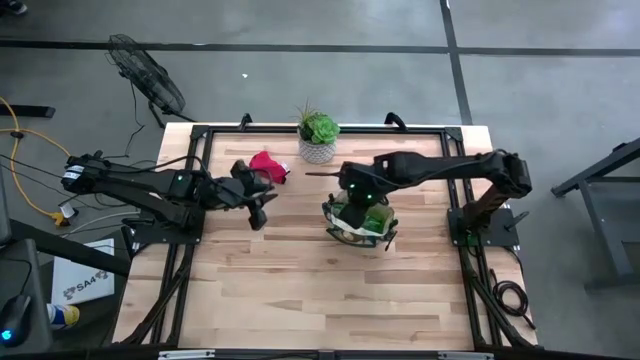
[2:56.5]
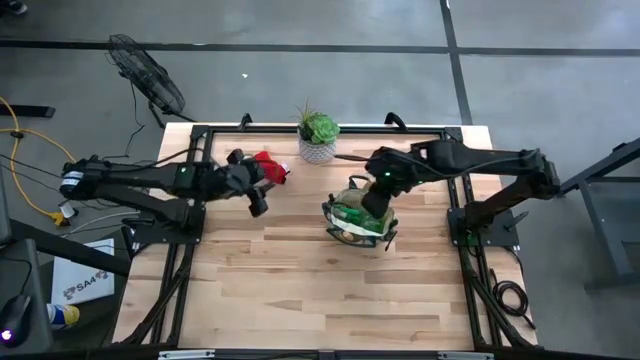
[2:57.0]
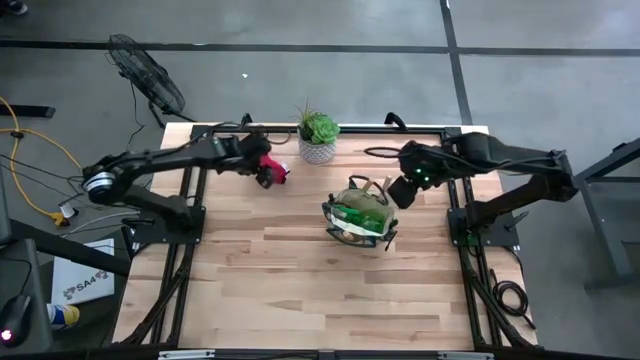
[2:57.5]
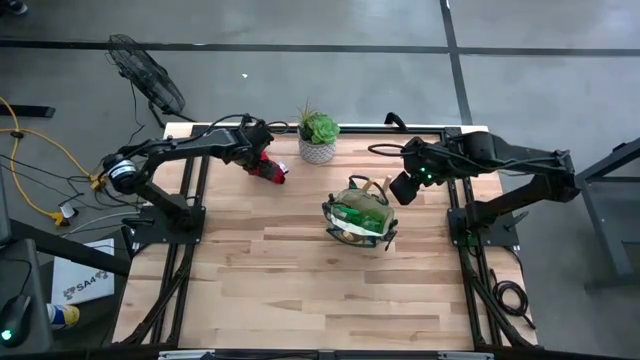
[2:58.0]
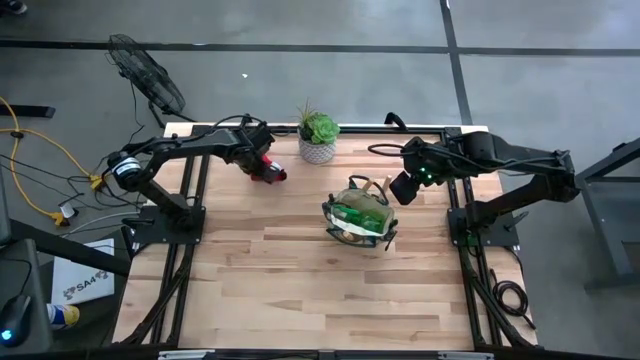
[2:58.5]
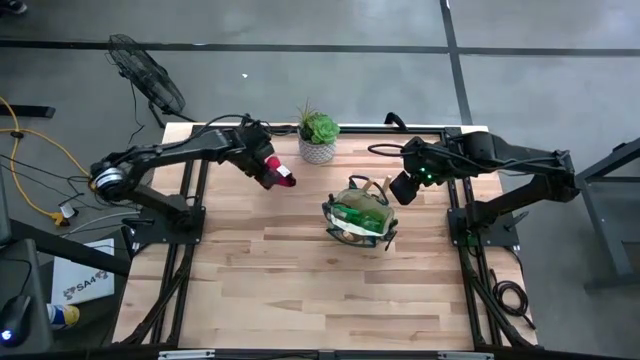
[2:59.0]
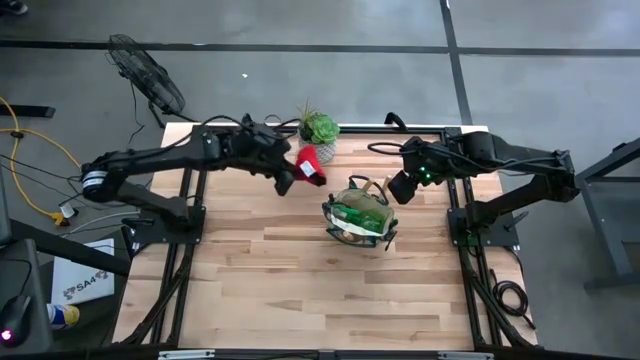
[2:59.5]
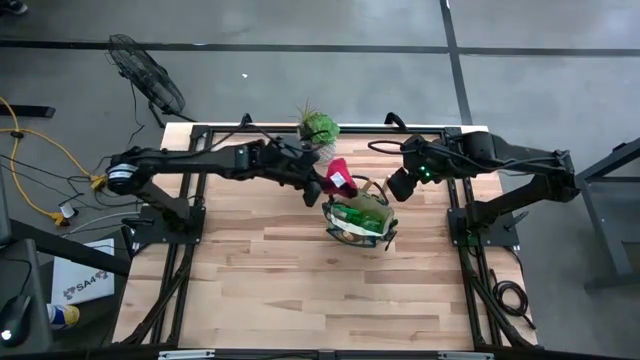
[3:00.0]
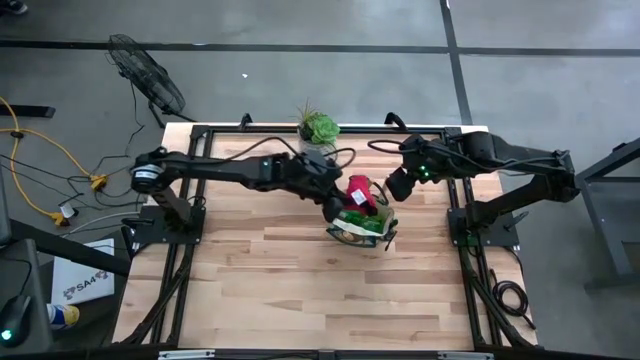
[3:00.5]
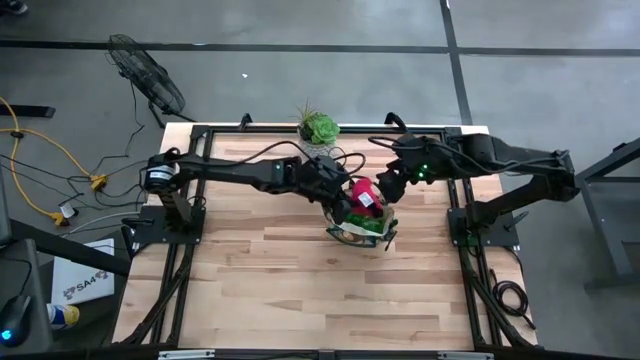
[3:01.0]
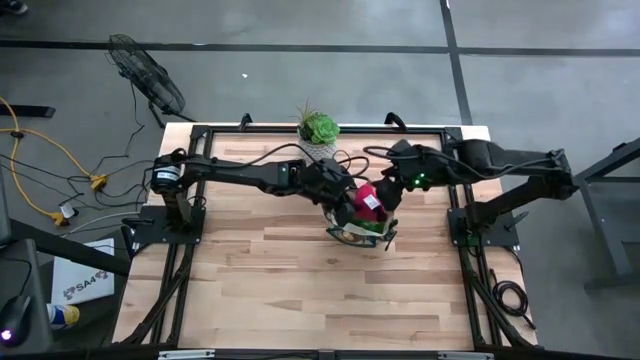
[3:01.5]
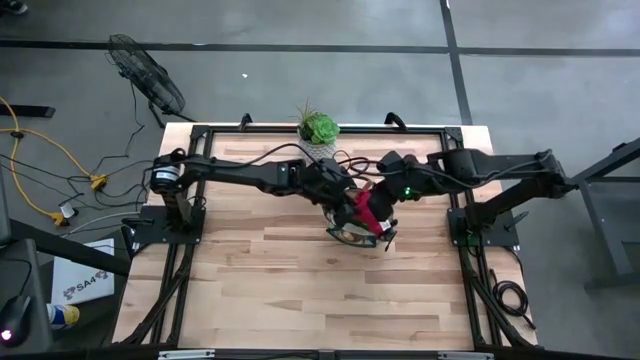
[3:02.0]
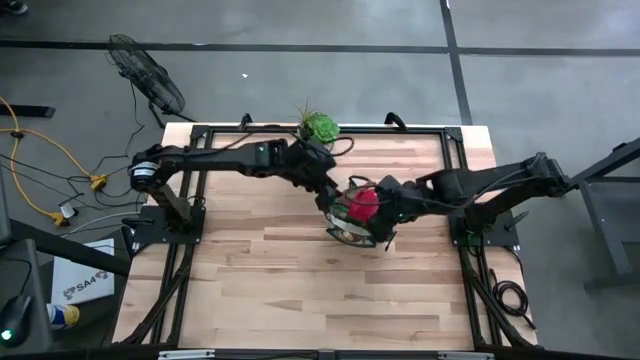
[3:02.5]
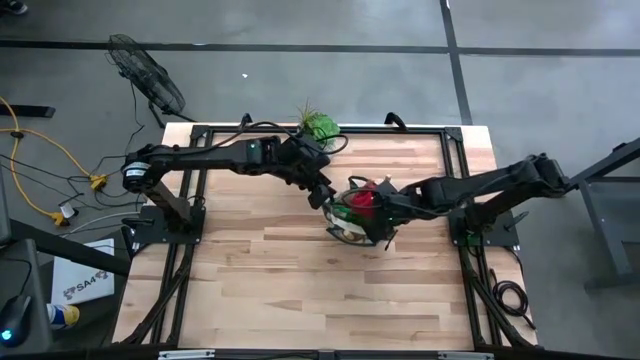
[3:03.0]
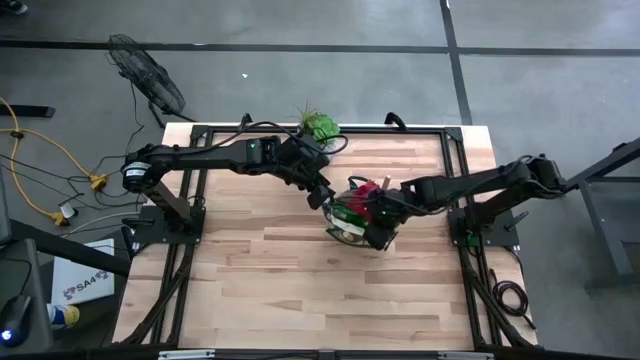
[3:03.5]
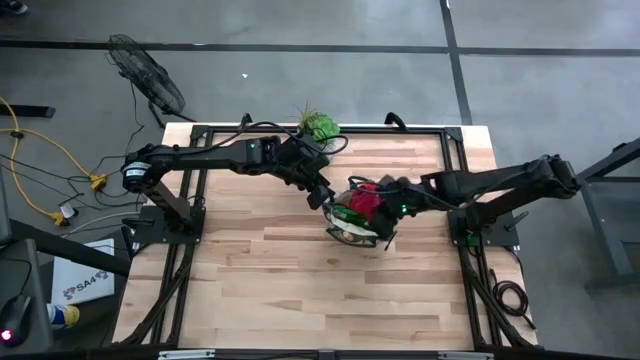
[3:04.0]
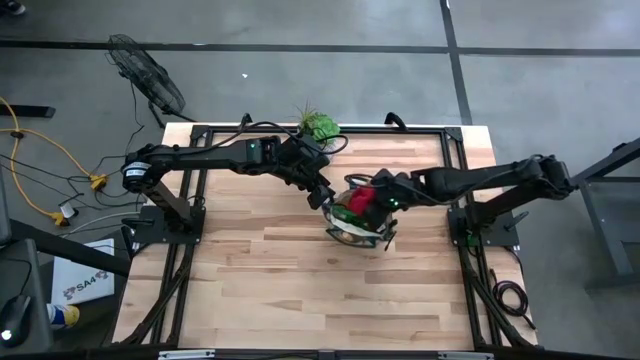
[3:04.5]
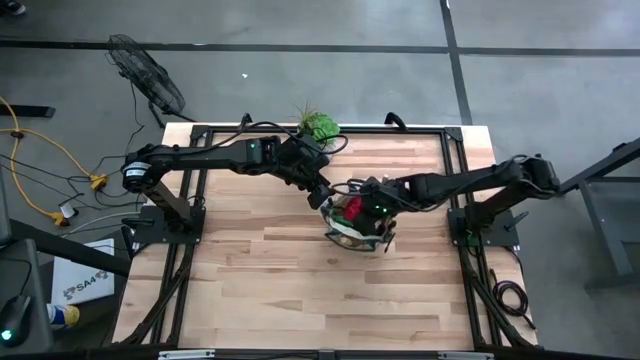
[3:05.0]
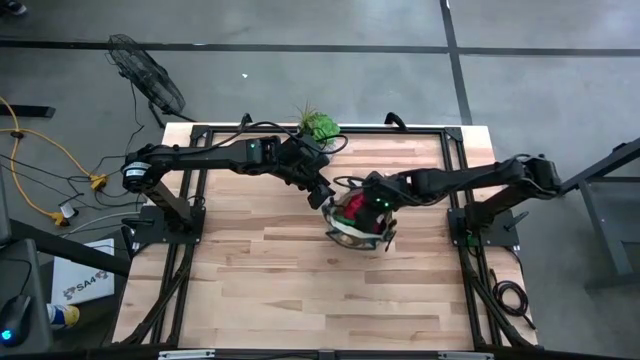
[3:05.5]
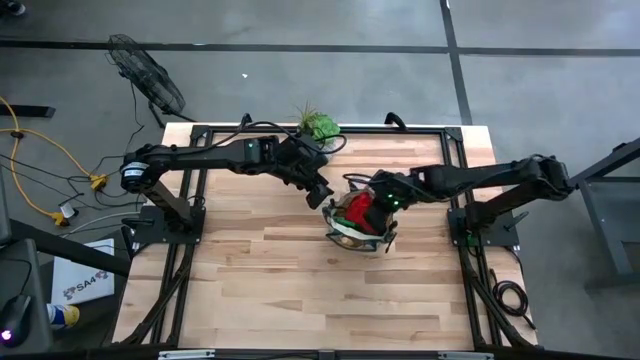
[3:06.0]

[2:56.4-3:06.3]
Task: Pick & Place Garden tools in Gardening bag
Put the red glove into the gardening bag

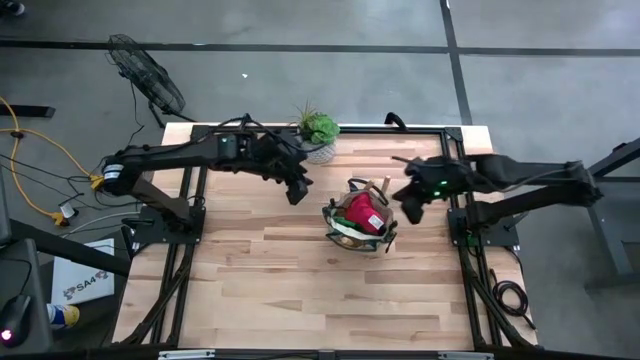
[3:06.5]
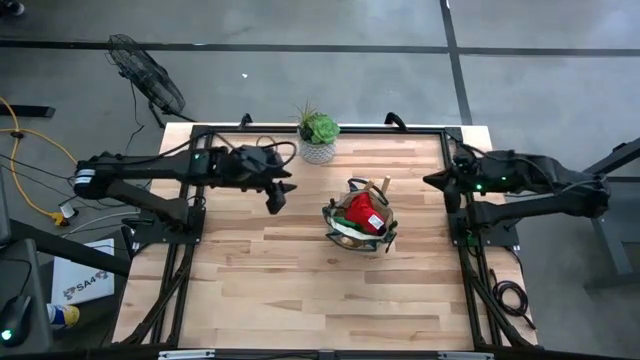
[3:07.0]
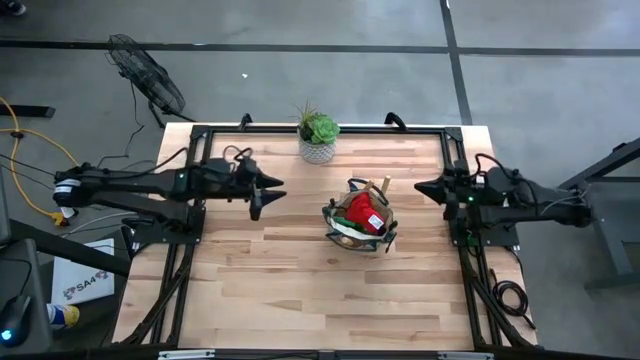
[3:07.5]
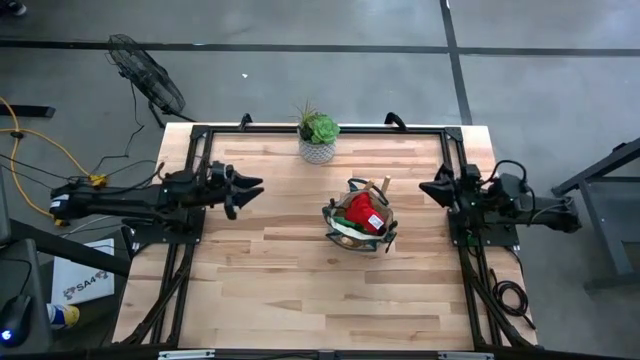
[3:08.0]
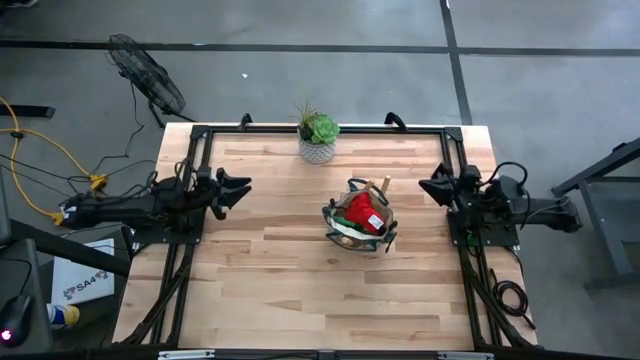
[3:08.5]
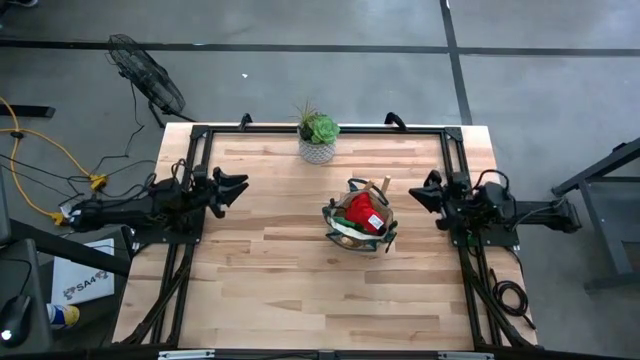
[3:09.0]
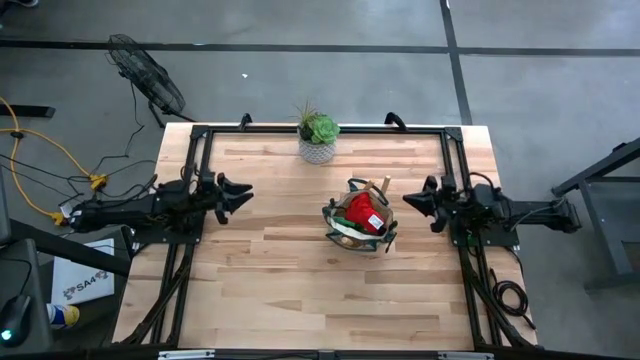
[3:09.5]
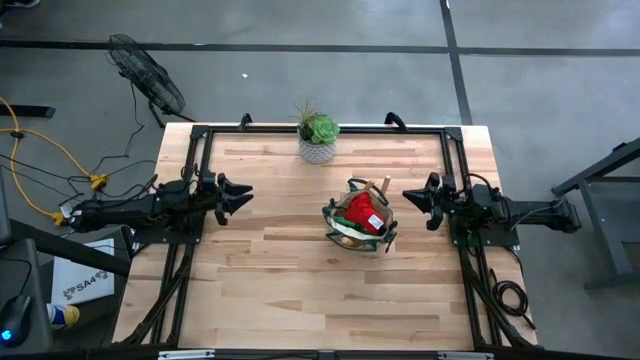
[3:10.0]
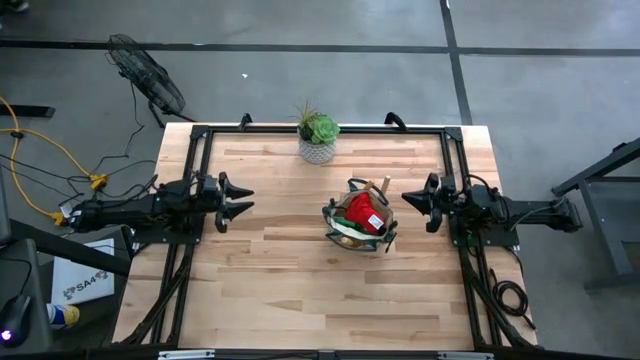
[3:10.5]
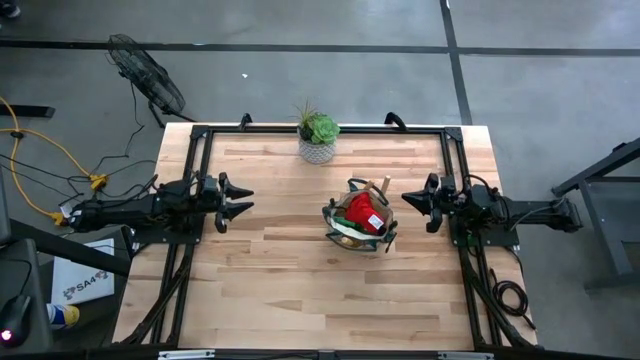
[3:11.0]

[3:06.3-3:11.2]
Return to Home Position

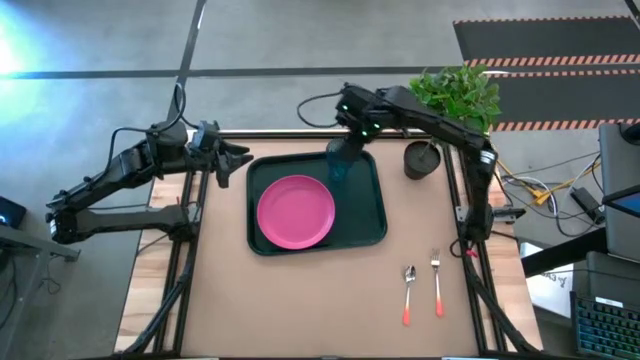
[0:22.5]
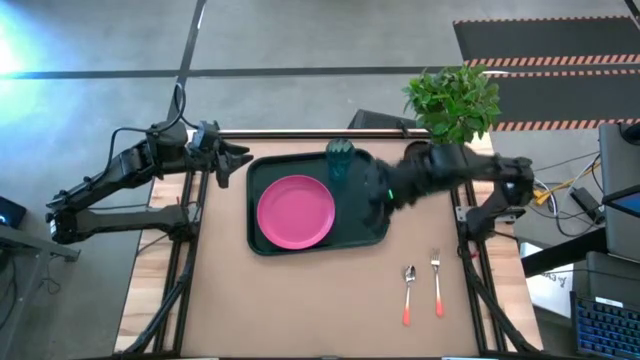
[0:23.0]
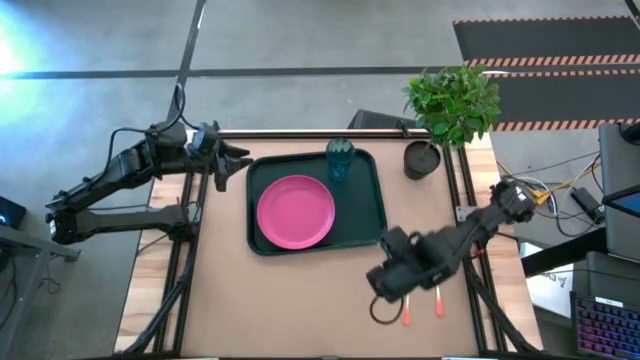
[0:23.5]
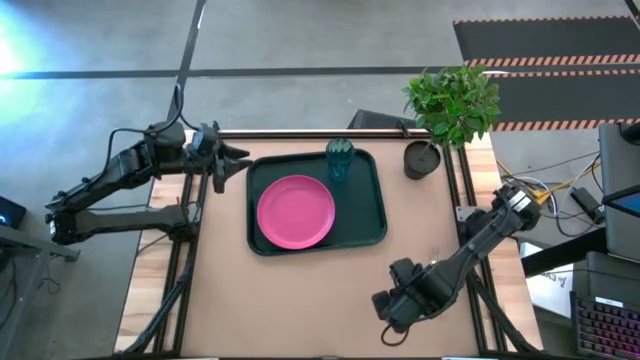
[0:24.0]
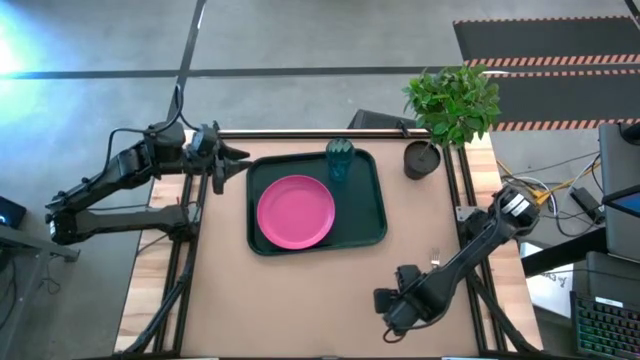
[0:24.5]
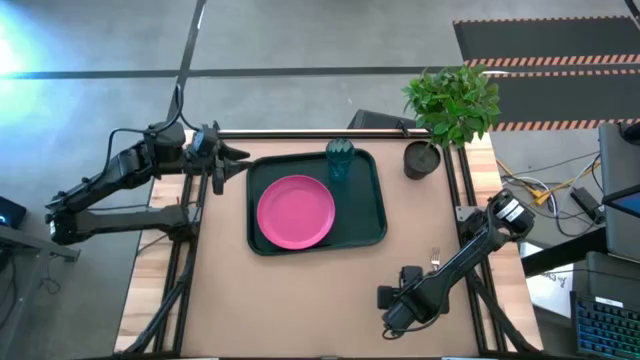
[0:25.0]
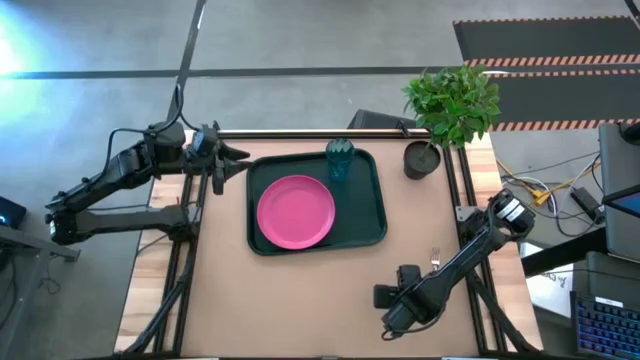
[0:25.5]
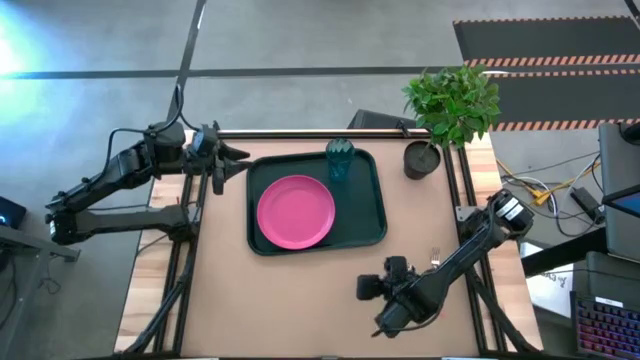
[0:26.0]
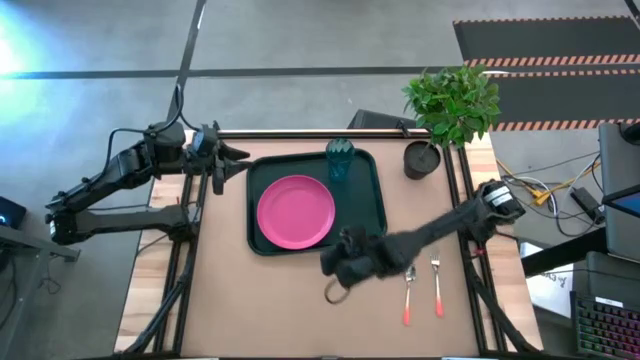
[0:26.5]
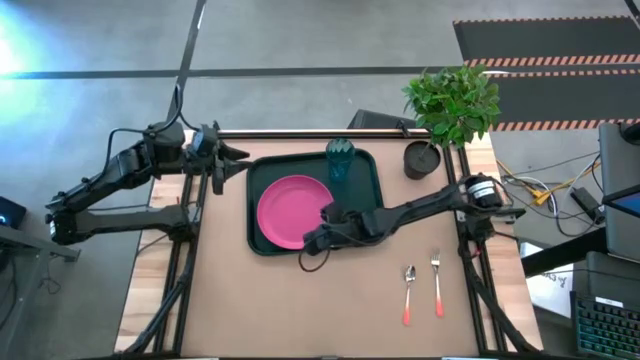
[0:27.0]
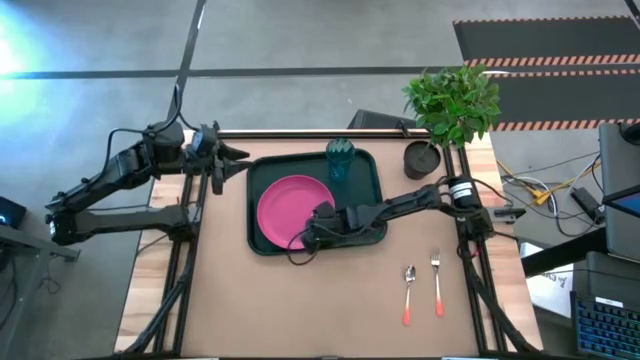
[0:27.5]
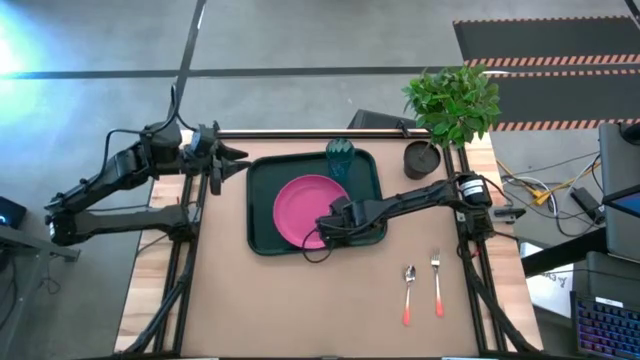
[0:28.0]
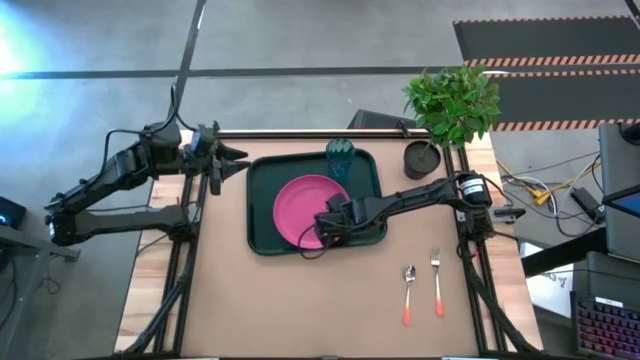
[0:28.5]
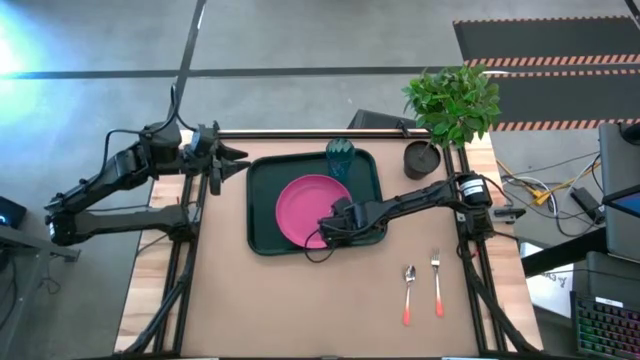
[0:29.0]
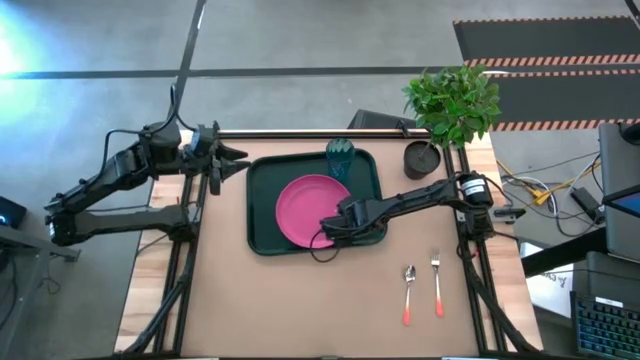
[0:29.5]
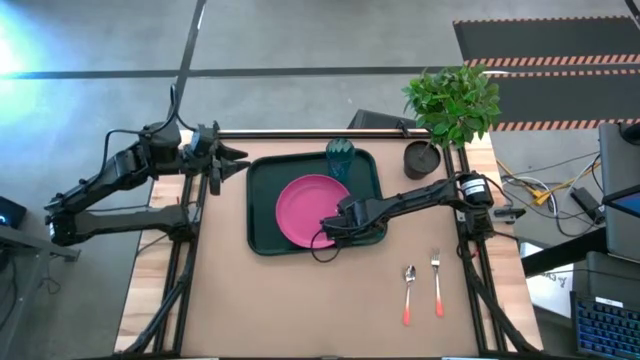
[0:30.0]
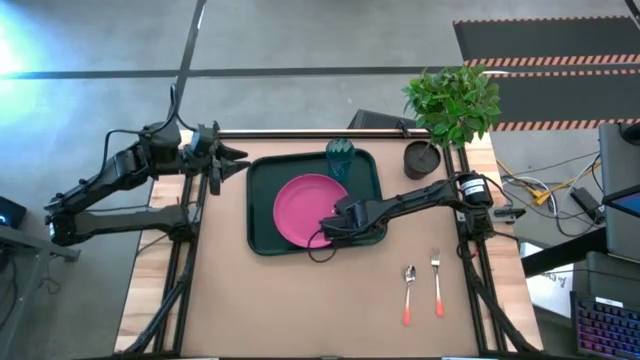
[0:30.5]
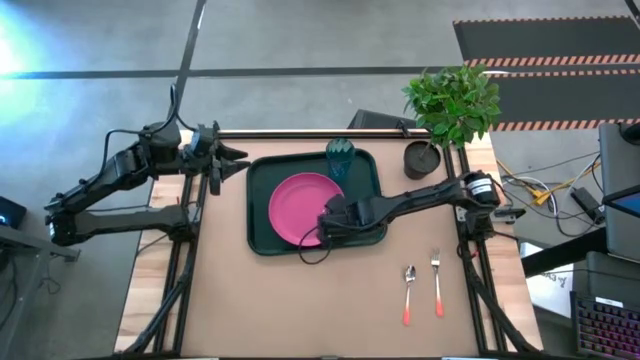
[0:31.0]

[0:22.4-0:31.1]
Task: Pick and place plate/cup/fork/spoon on tray
Adjust the pink plate on the center of the black serving tray
